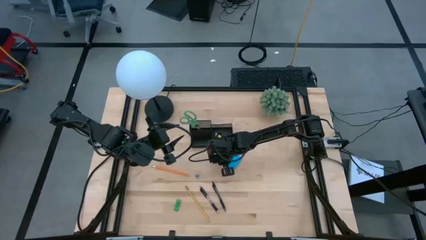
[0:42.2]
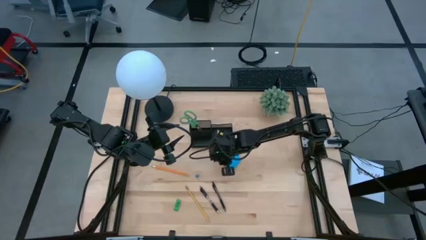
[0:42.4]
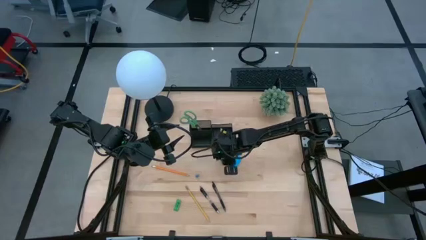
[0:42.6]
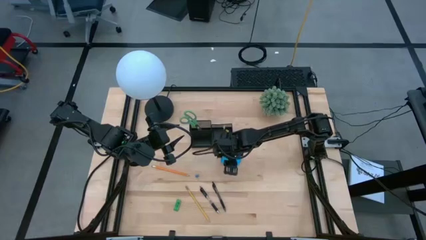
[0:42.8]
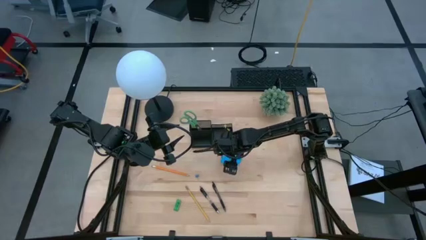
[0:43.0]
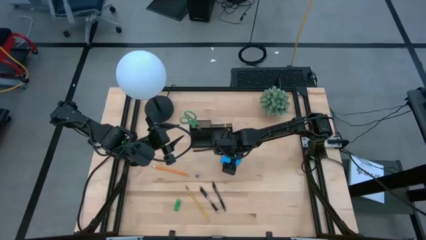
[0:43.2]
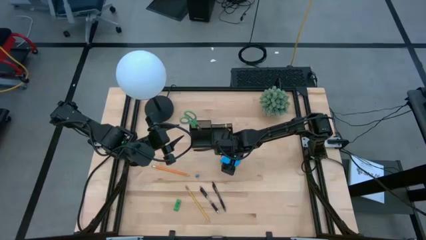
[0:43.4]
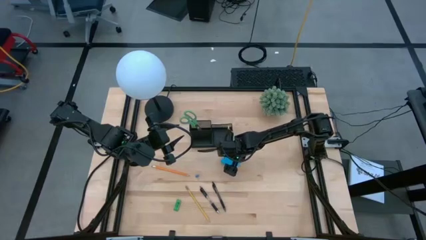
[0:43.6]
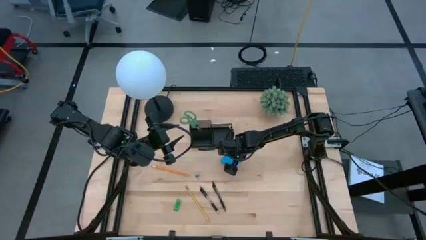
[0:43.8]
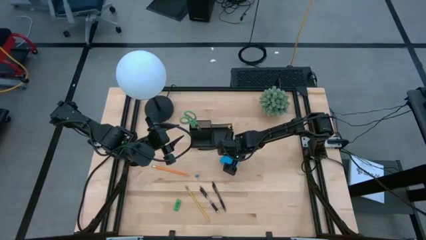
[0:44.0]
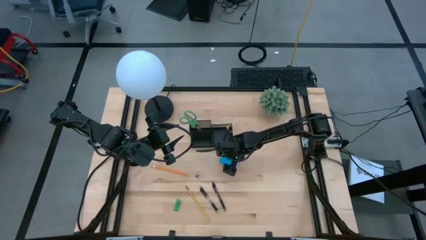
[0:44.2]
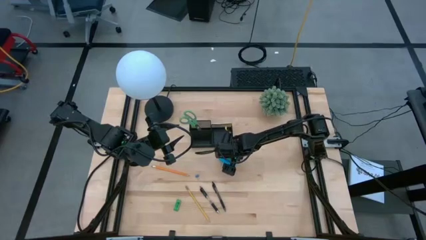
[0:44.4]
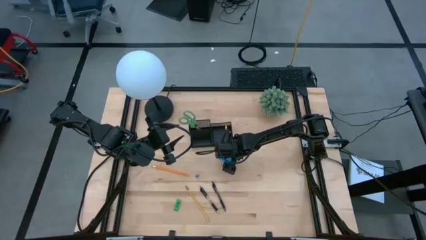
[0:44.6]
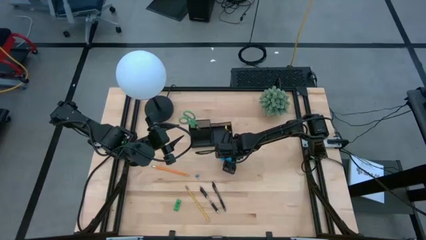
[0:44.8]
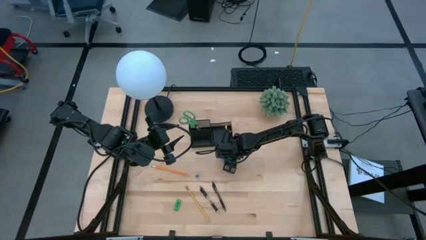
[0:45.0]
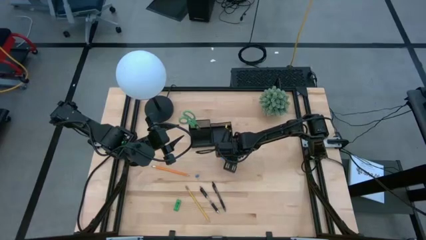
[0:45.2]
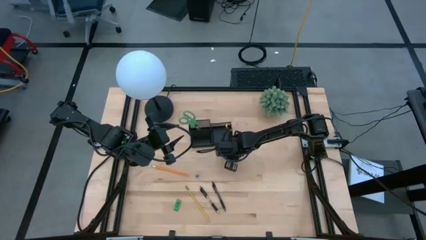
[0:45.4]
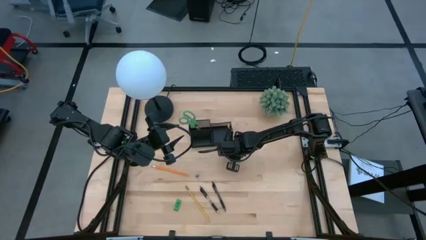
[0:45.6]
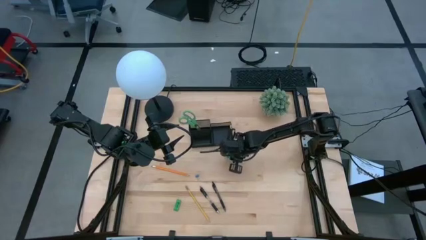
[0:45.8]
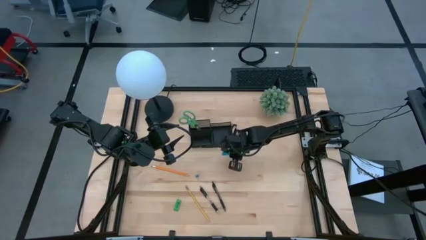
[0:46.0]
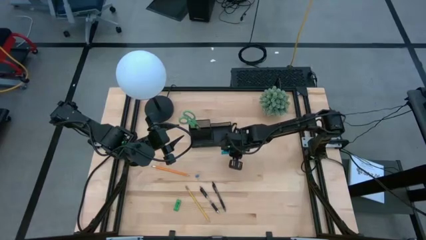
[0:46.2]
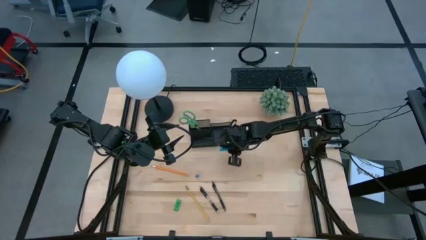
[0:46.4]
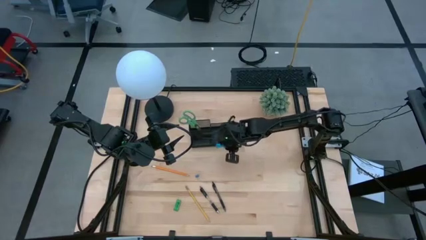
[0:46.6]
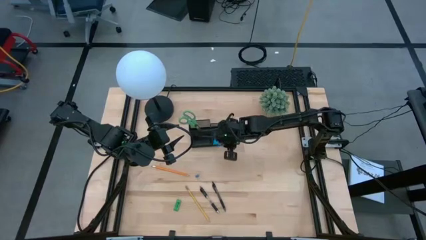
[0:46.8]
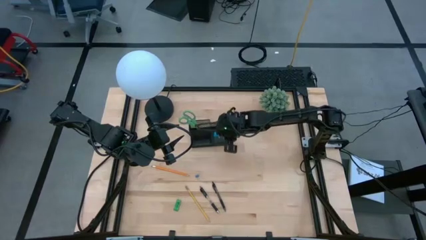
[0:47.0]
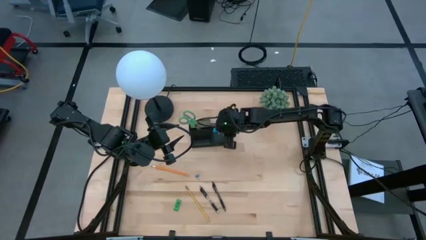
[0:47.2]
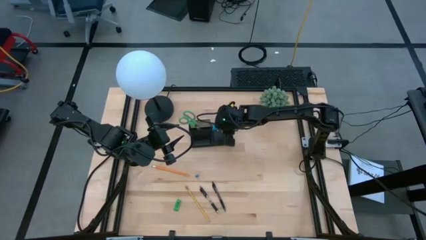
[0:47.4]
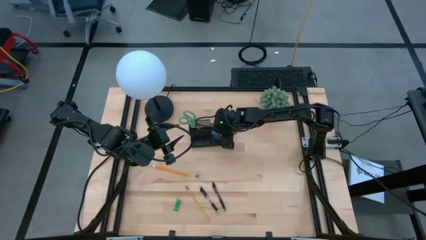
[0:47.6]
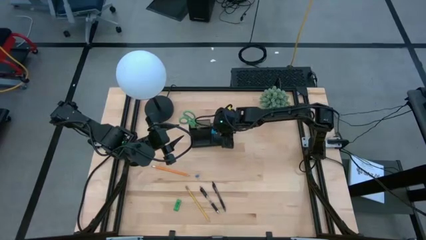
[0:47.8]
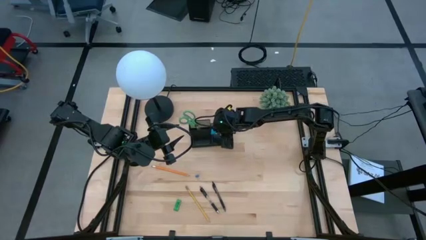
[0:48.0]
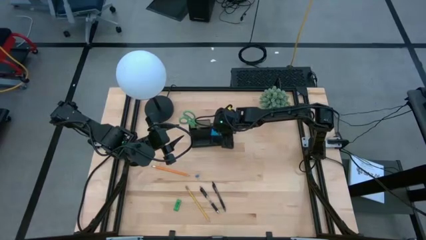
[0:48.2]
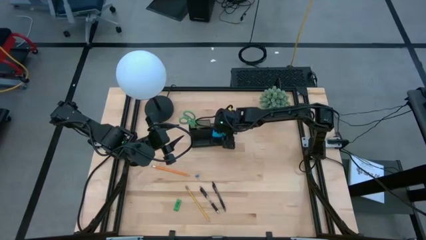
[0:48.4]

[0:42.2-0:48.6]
Task: Pick and place office supplies into organizer
Put the blue sticky notes into the black desk organizer

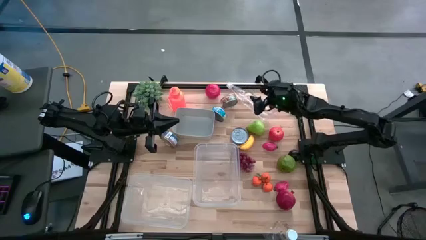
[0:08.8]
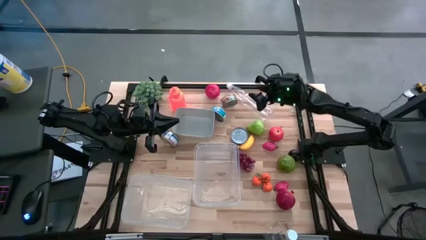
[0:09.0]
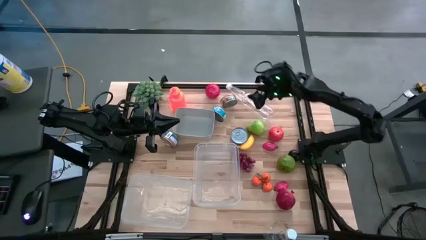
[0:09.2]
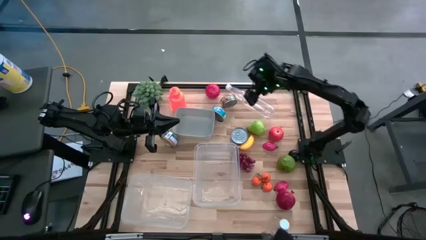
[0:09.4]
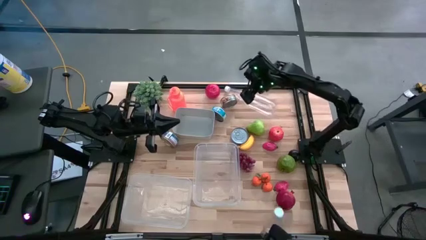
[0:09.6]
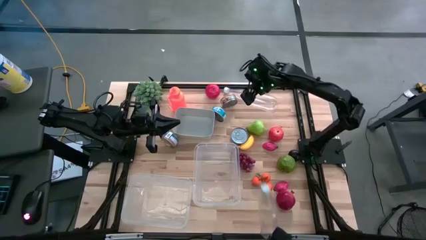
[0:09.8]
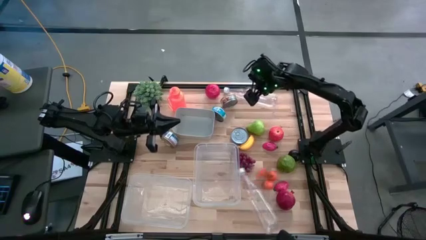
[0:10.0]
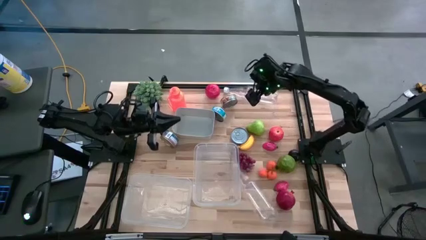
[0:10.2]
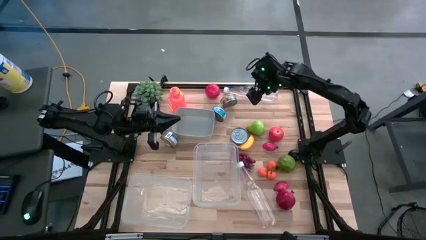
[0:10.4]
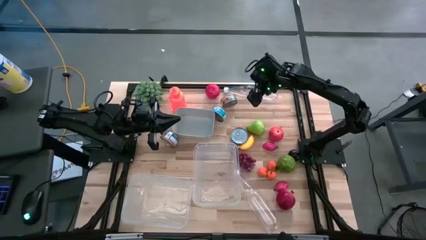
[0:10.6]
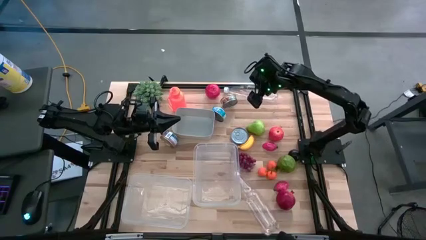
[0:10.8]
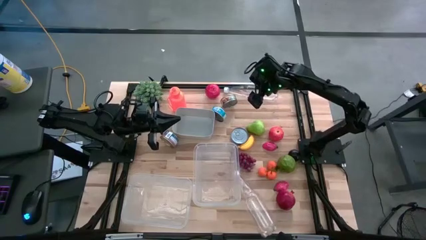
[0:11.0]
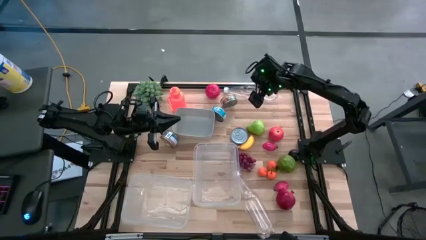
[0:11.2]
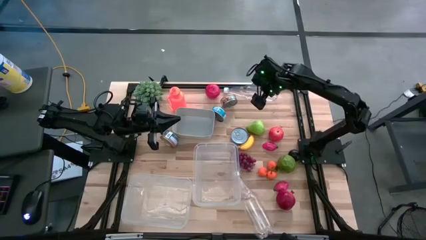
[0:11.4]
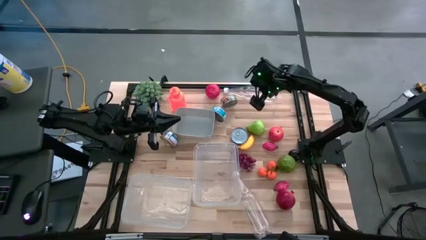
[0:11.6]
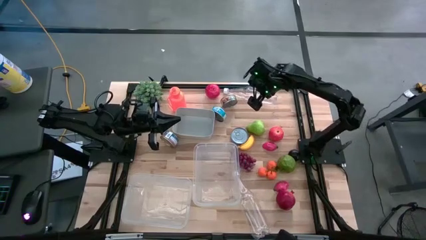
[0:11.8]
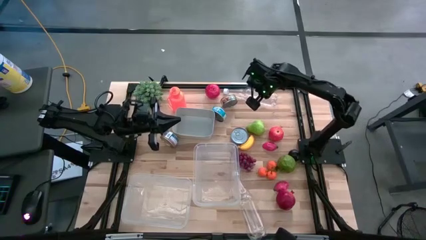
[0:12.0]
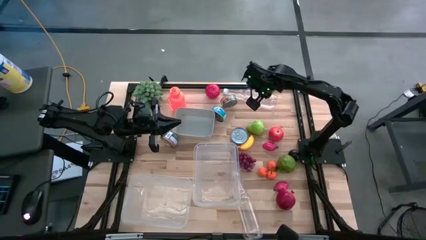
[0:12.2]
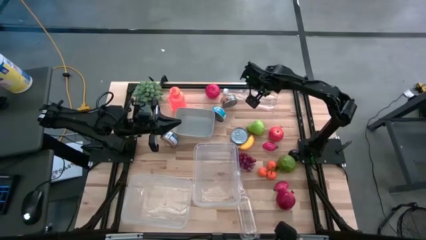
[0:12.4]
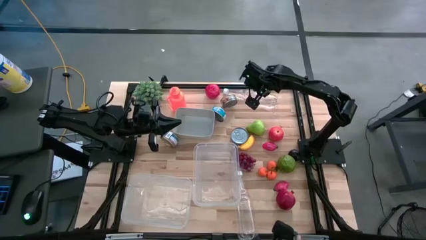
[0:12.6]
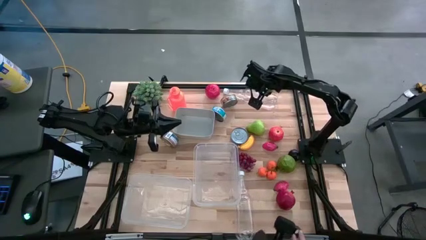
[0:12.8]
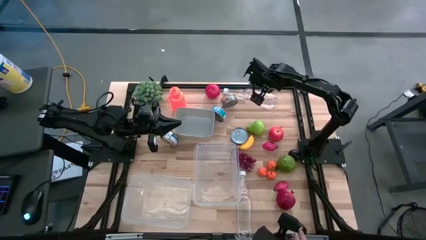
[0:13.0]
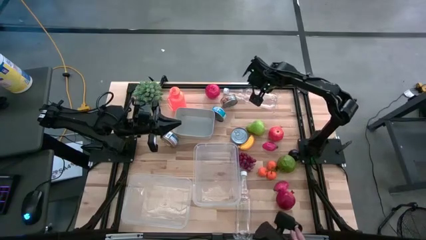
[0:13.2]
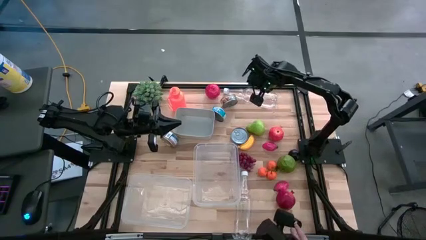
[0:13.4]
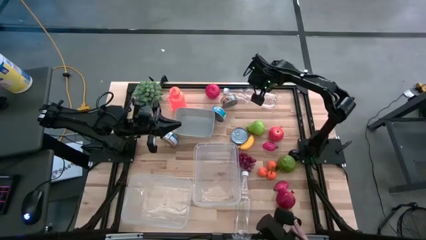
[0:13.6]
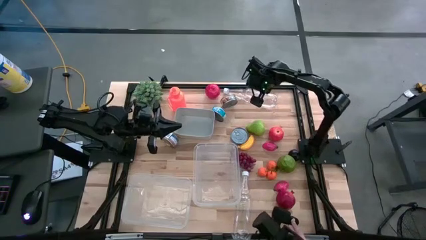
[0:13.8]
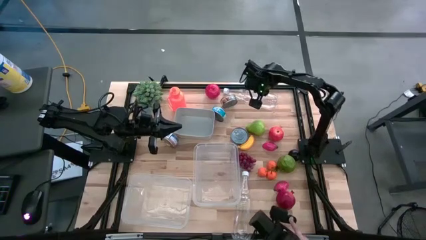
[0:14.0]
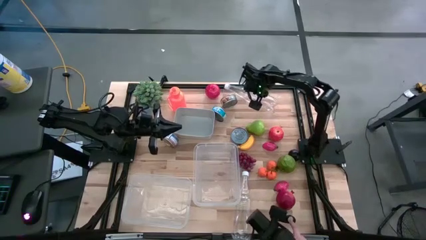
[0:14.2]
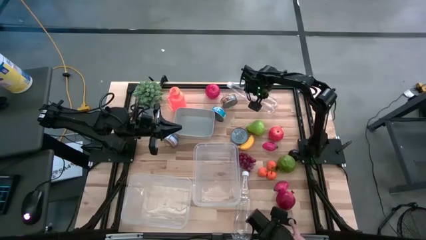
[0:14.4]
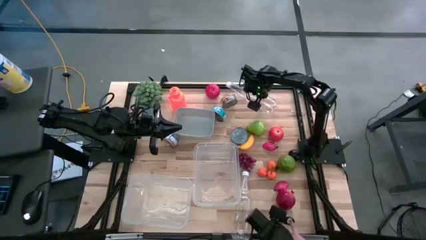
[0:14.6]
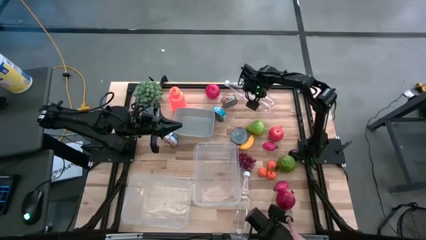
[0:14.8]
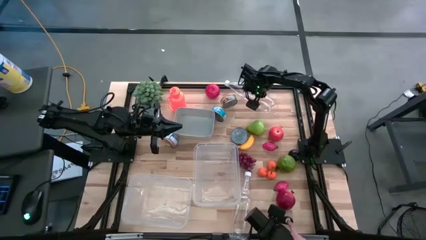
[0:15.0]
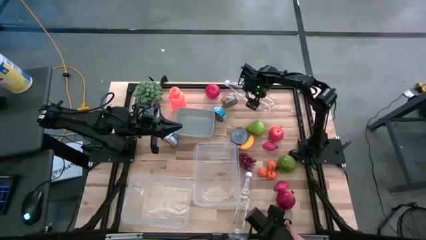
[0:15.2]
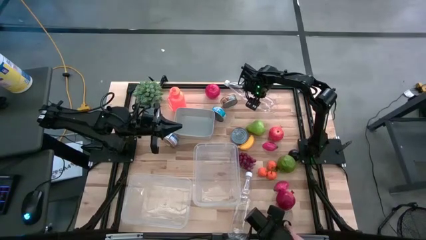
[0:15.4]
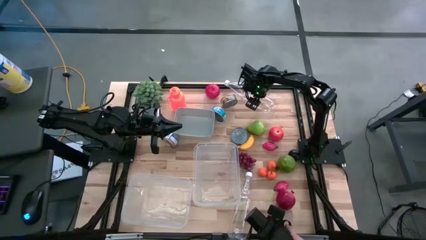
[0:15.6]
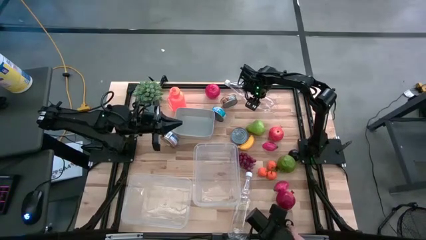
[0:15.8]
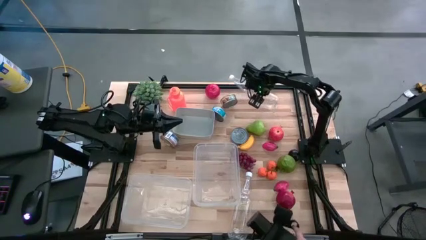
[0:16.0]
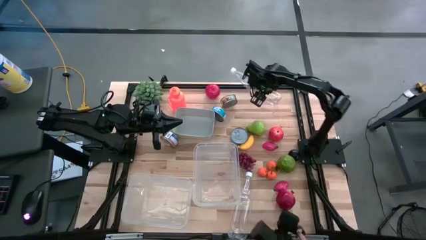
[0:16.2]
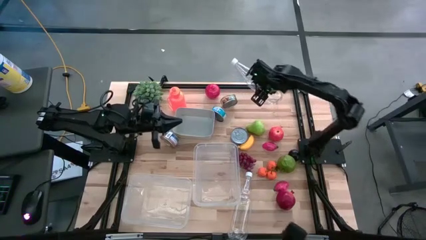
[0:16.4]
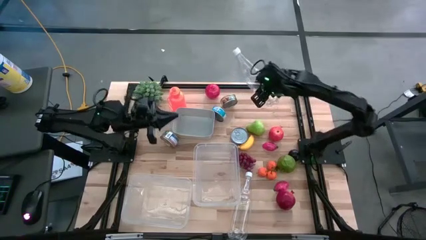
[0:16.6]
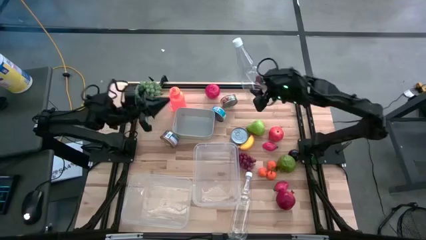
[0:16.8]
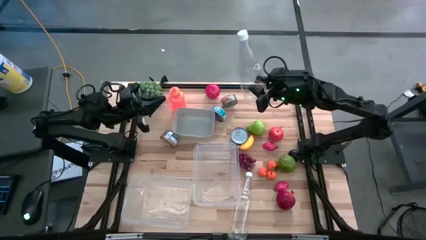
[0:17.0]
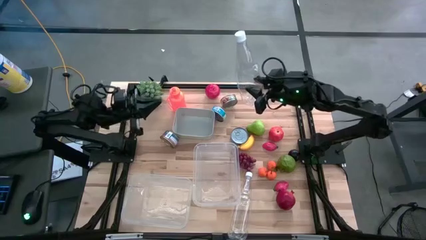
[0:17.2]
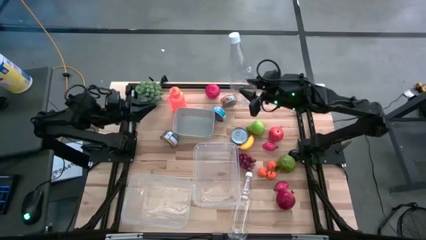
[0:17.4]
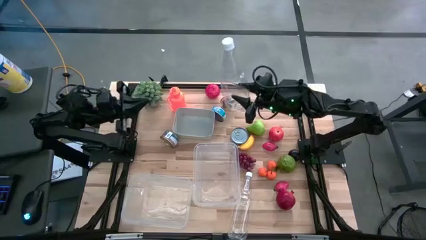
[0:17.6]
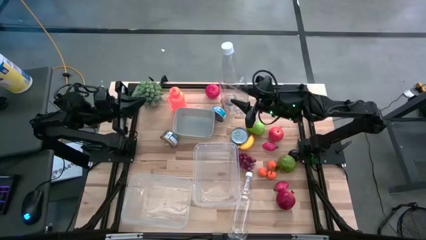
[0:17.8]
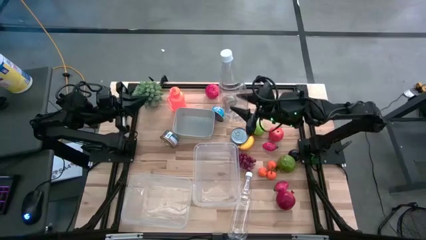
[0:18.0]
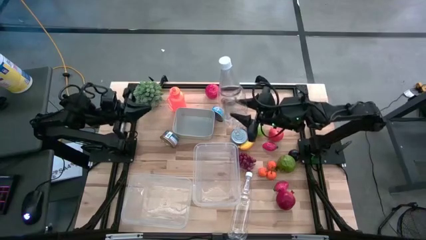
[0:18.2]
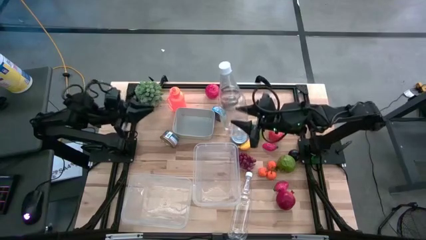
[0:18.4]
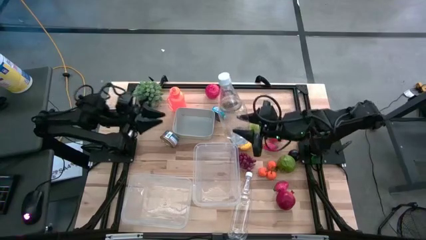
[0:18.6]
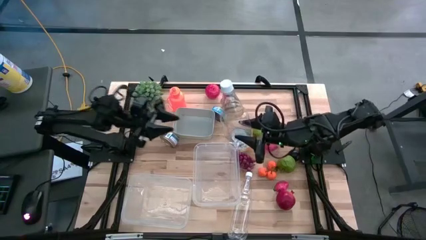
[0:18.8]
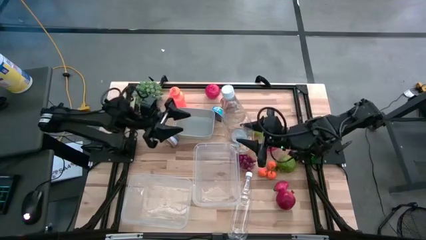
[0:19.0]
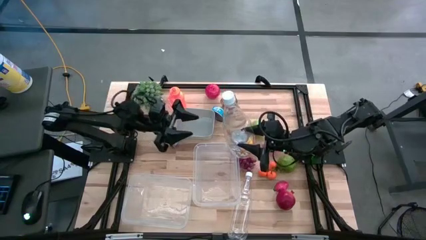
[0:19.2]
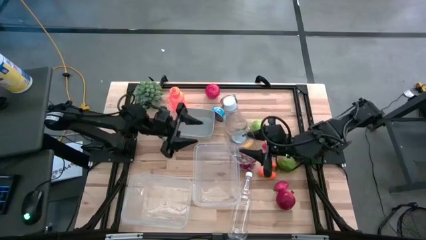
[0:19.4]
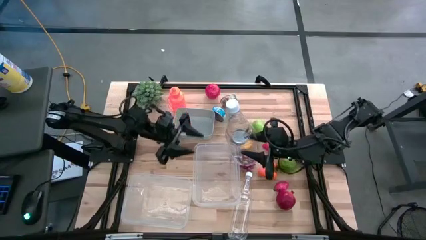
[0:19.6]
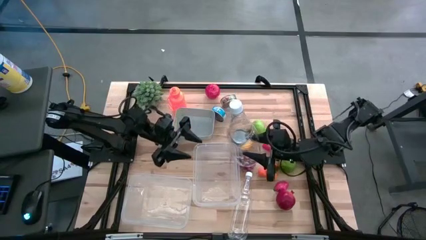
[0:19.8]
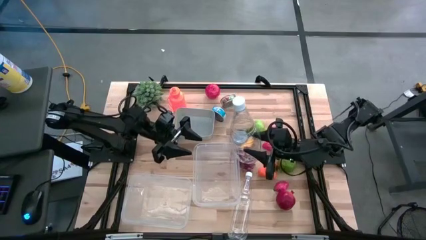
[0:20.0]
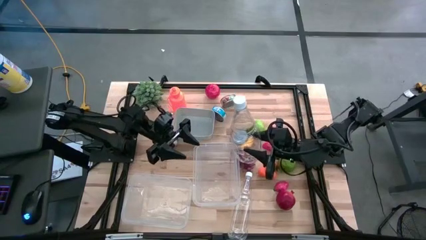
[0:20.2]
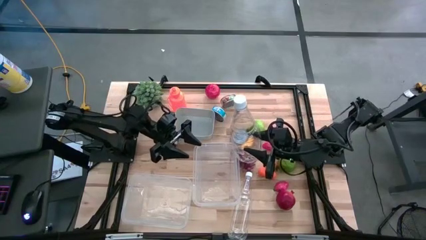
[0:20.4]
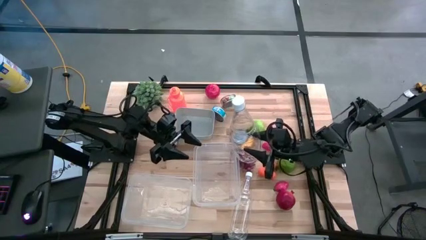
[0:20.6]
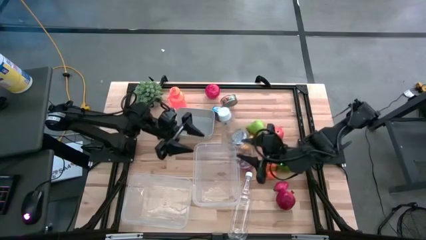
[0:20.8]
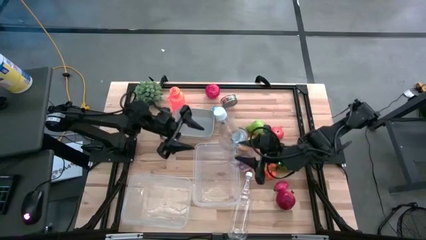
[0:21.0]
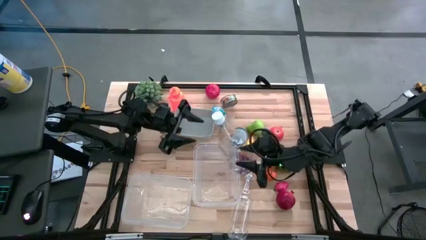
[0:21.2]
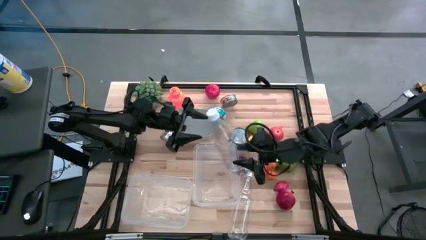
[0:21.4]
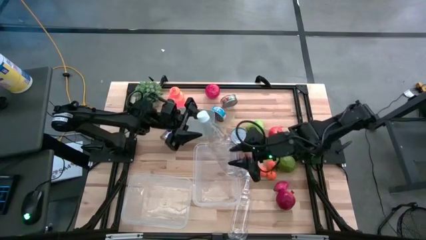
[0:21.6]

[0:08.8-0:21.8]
Task: Pick & Place Food Item
Put the top transparent plastic bottle into the left transparent bin
